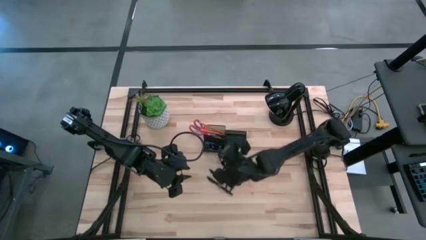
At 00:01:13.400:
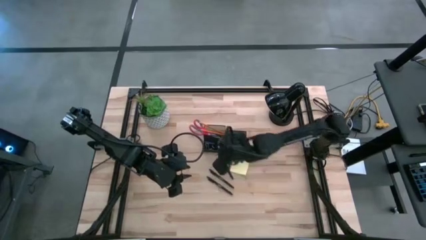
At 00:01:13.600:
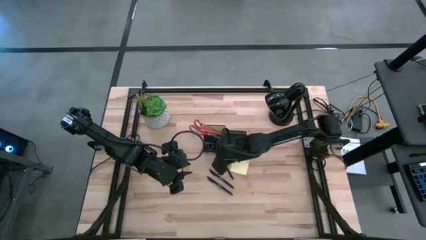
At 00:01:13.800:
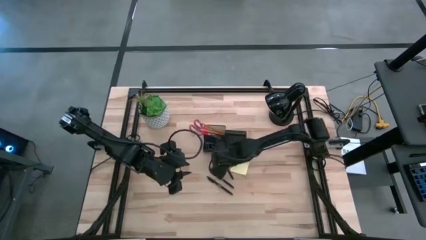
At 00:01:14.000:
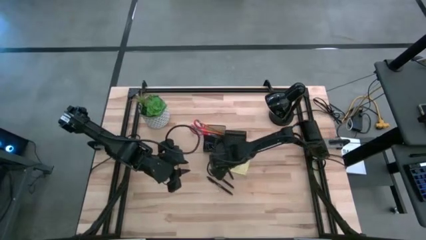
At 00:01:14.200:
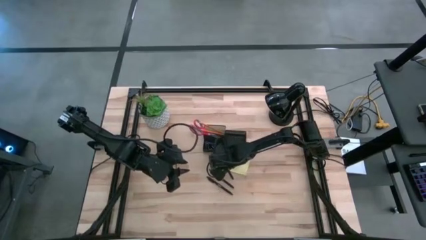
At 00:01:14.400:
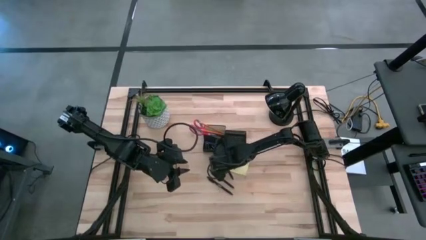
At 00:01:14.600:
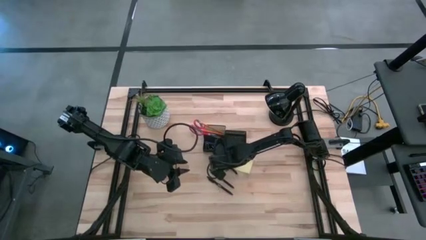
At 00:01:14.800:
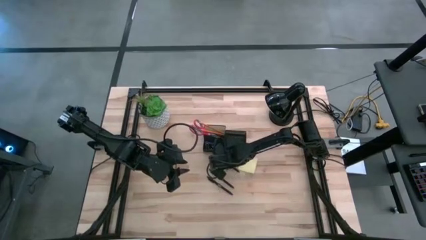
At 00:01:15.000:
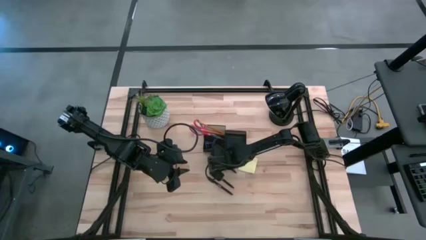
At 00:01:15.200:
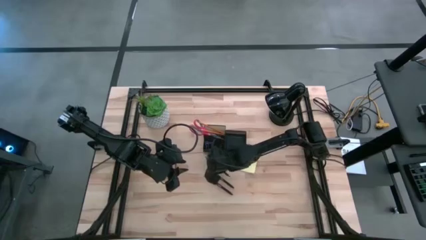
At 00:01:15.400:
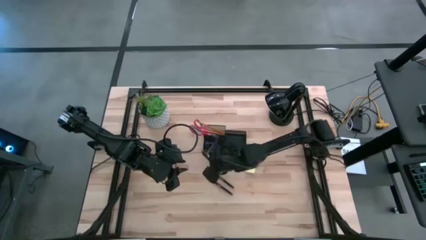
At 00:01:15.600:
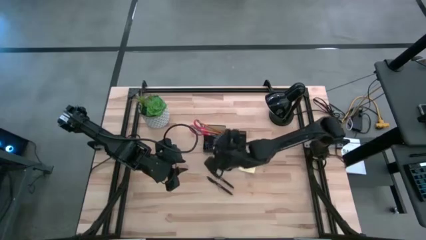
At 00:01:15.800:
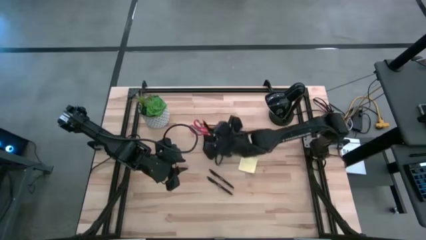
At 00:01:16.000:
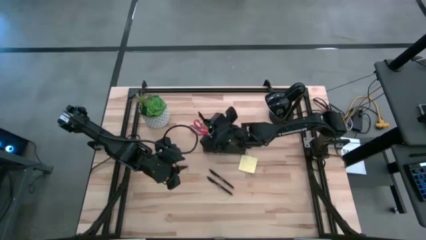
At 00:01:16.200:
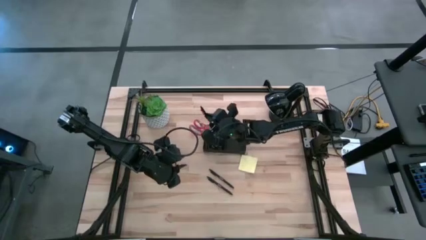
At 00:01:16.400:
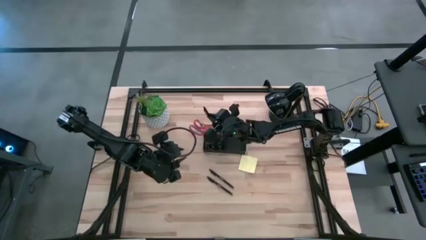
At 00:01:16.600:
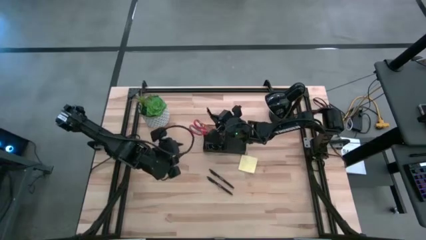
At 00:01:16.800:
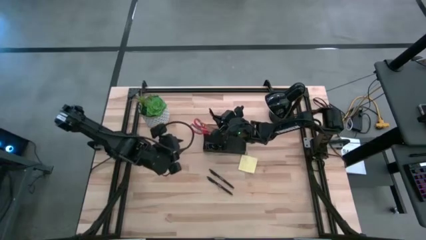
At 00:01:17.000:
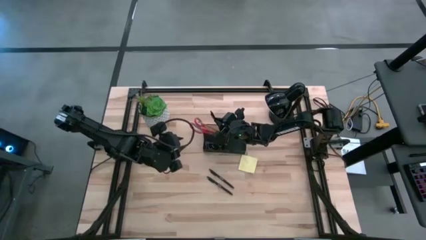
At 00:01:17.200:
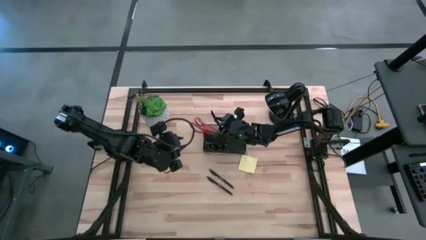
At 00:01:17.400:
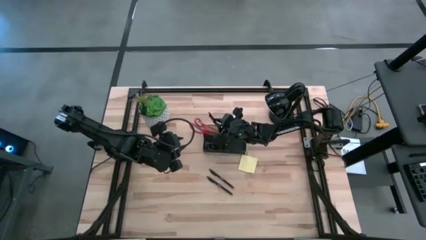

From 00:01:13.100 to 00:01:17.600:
Task: Pick and place office supplies into organizer
Put the right black pen into the black desk organizer

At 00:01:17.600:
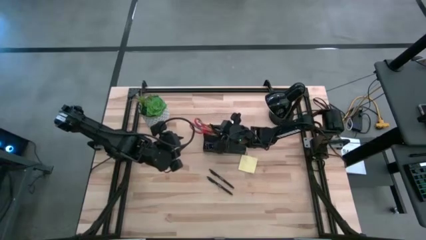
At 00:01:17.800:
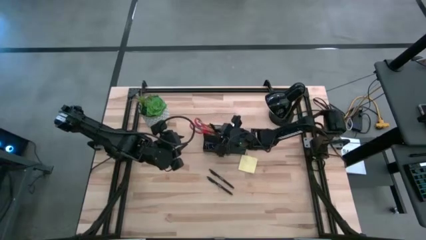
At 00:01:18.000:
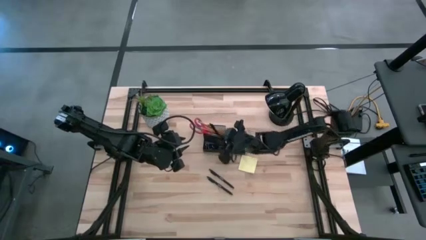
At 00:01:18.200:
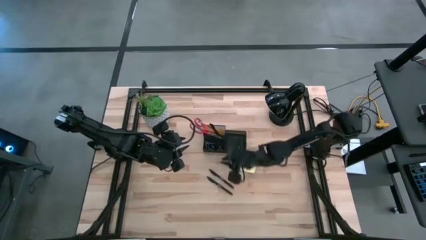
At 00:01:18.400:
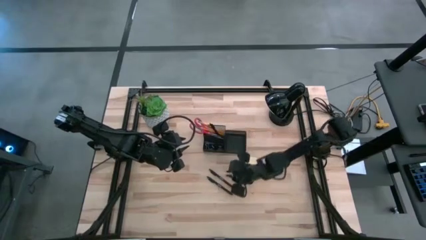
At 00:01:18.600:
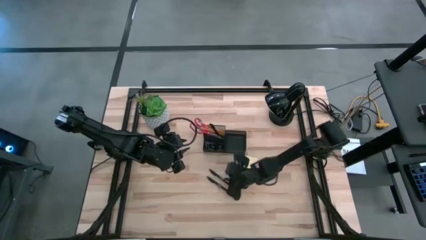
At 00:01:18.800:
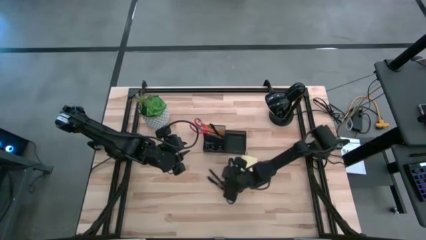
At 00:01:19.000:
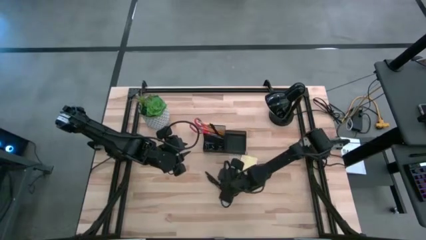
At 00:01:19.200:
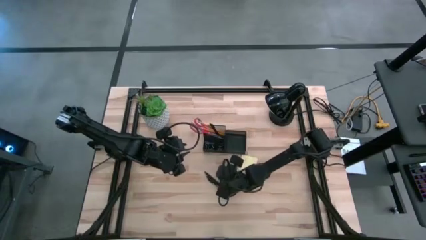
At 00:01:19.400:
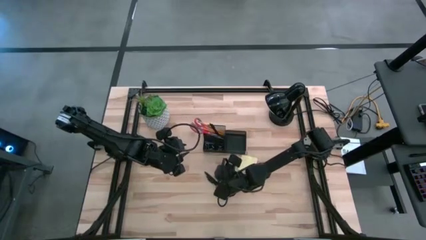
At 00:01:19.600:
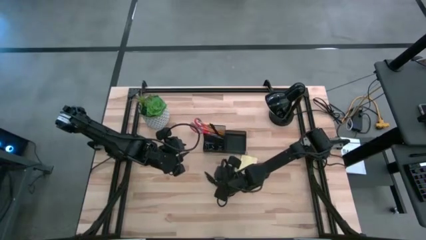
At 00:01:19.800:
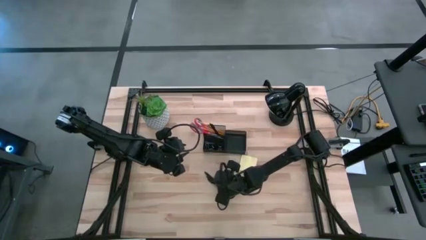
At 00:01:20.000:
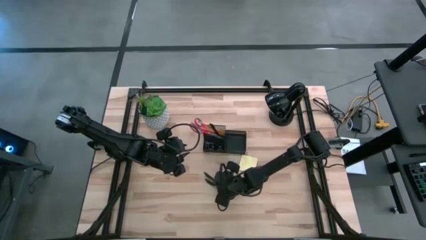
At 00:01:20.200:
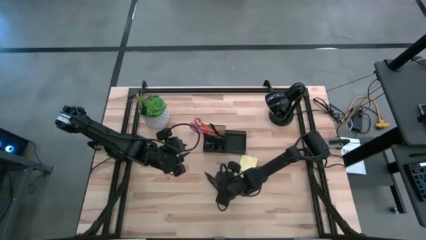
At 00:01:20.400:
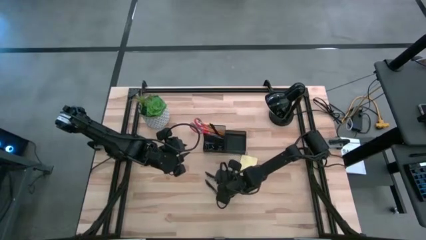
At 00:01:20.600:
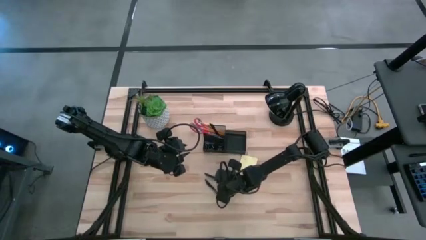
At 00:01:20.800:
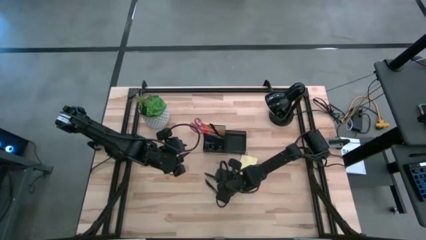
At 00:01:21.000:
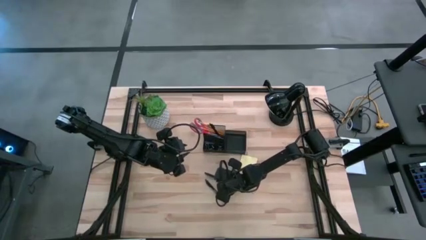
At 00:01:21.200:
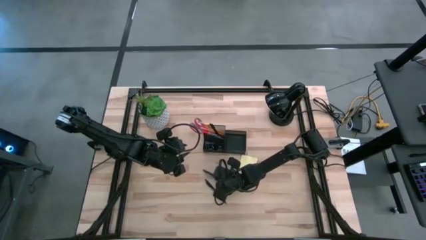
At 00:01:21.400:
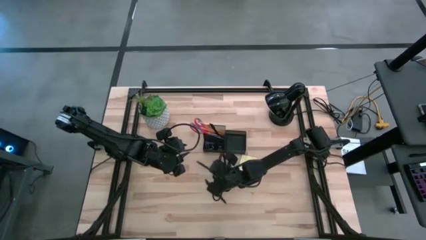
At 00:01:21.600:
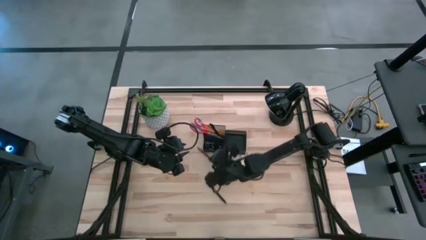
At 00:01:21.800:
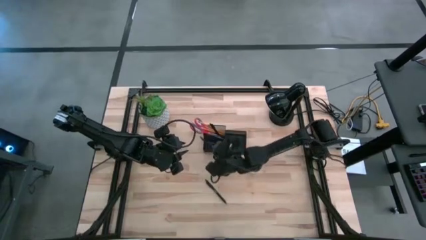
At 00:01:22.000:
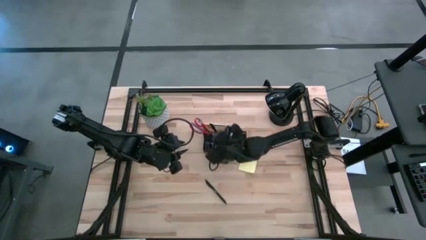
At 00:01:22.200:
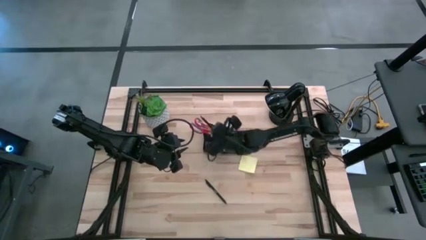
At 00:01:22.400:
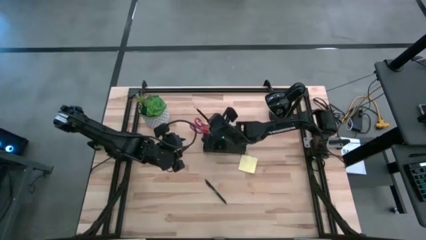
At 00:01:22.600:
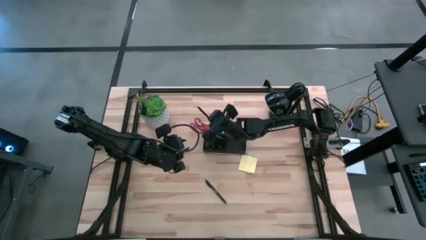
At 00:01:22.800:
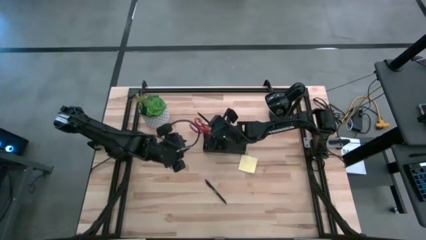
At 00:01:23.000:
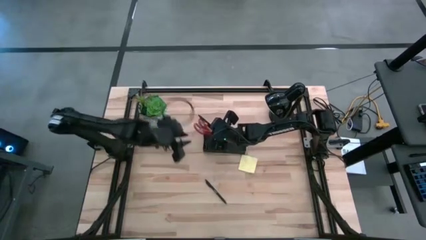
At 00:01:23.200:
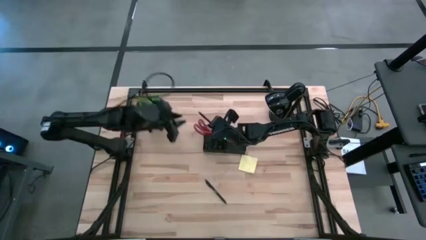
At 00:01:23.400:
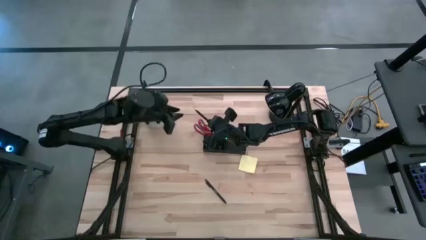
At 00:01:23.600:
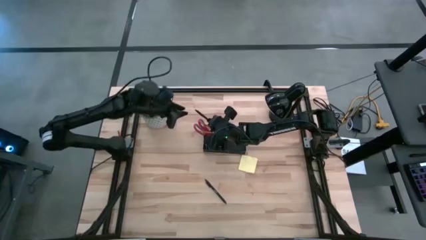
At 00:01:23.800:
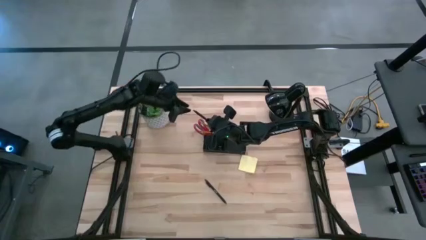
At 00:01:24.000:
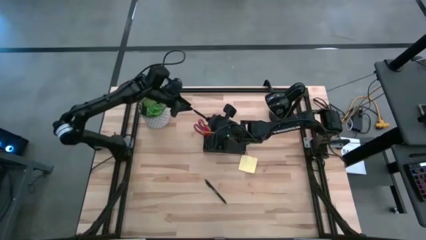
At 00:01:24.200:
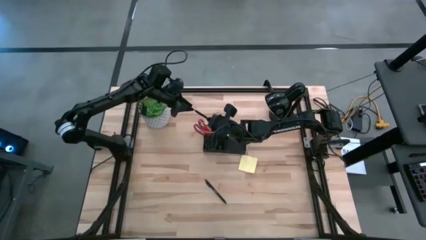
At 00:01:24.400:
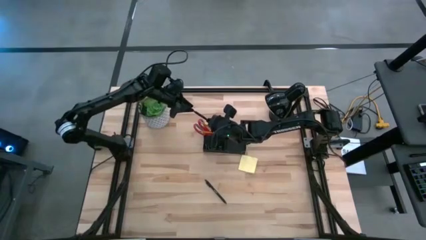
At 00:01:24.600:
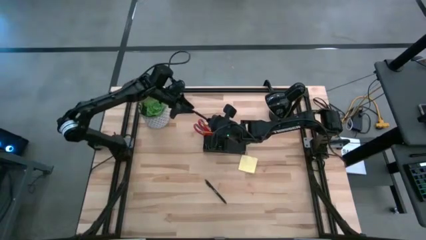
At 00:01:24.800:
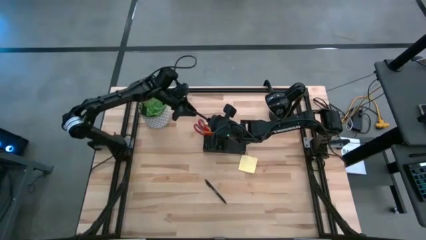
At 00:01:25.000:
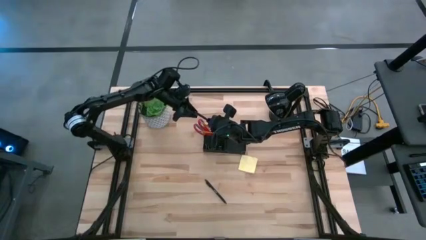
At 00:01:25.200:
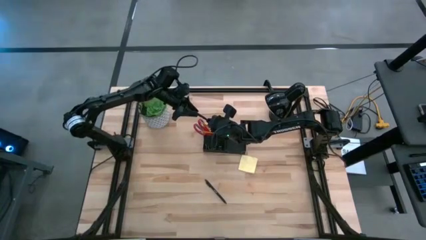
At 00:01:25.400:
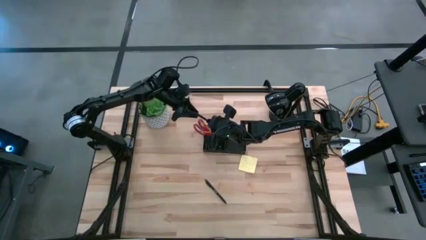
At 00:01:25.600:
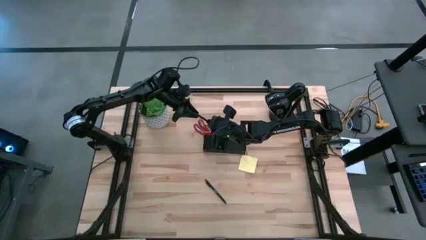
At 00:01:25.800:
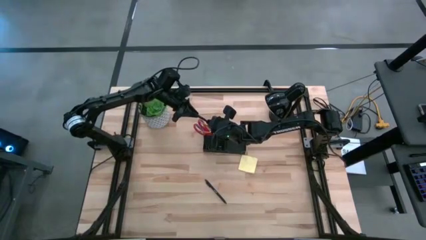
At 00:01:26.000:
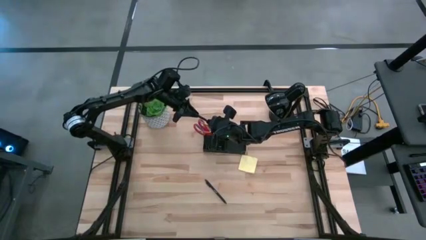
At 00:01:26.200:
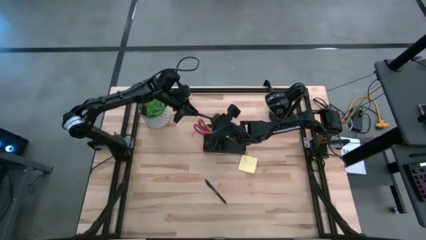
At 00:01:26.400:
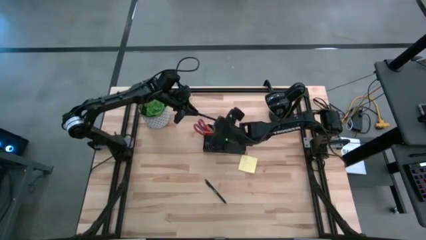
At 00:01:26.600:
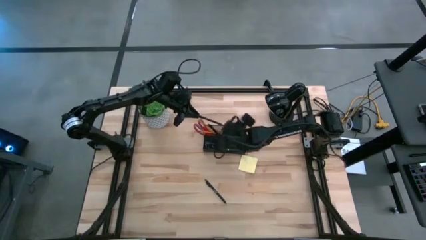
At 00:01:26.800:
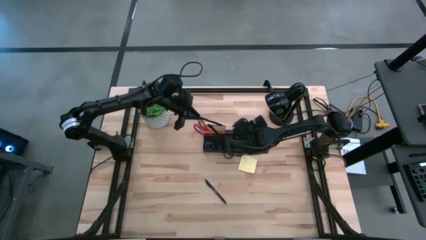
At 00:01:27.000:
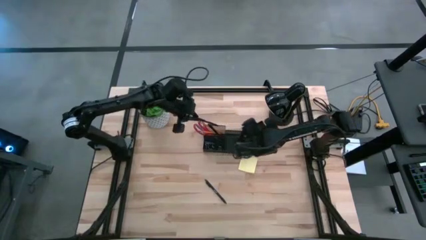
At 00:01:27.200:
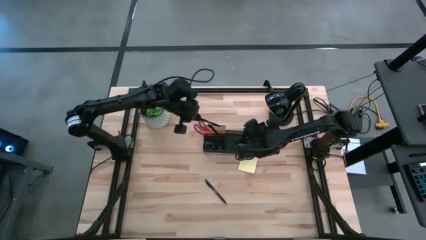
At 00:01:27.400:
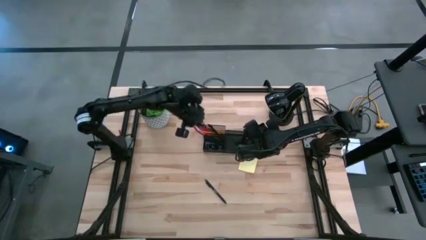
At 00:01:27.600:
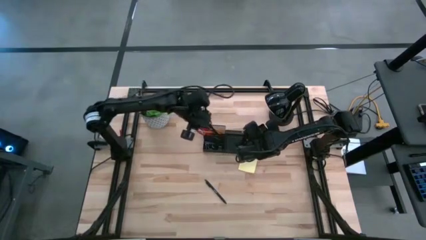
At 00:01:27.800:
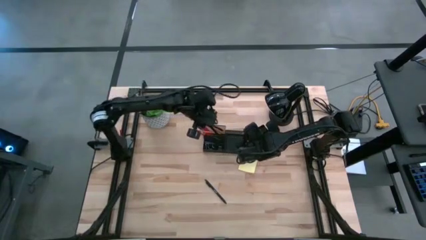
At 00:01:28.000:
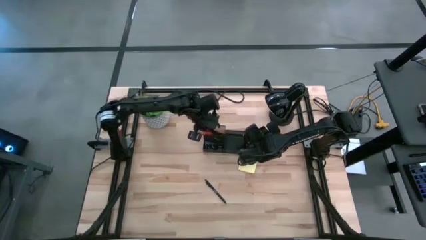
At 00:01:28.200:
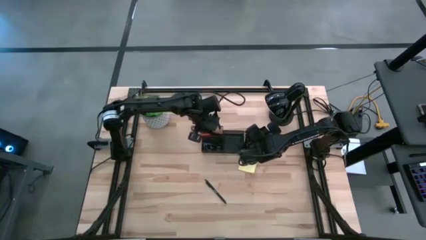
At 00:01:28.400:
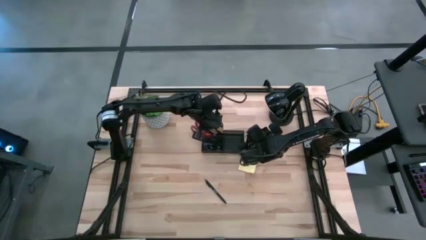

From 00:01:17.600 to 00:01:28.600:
Put the top black pen into the black desk organizer
